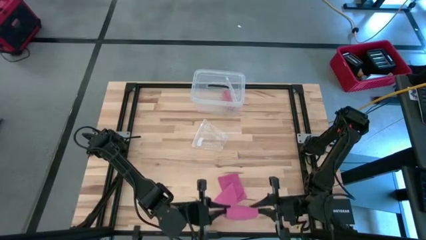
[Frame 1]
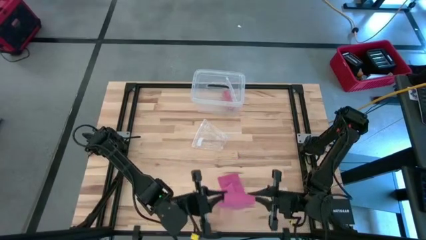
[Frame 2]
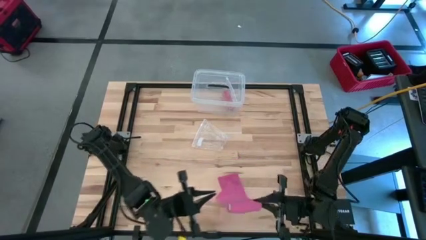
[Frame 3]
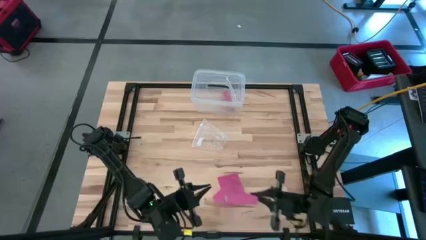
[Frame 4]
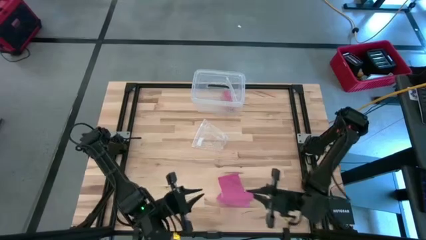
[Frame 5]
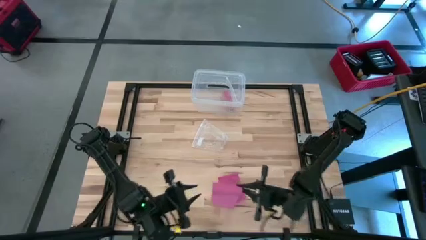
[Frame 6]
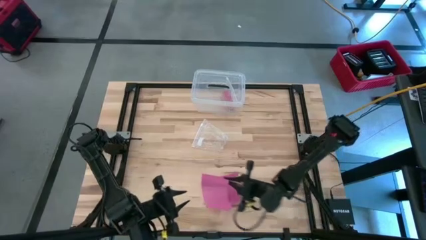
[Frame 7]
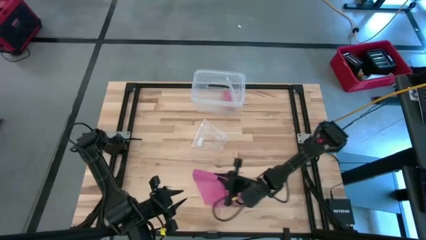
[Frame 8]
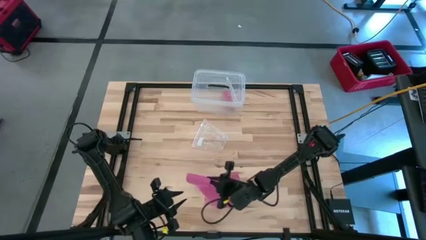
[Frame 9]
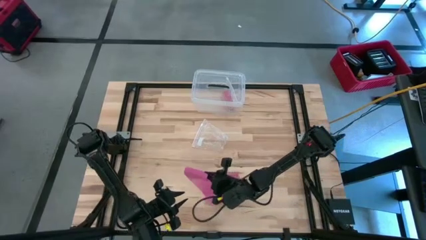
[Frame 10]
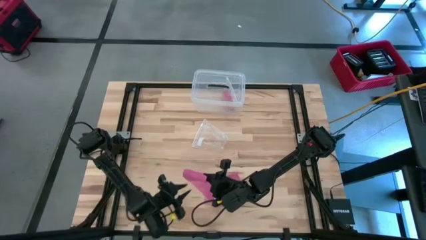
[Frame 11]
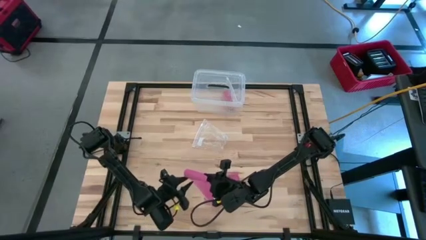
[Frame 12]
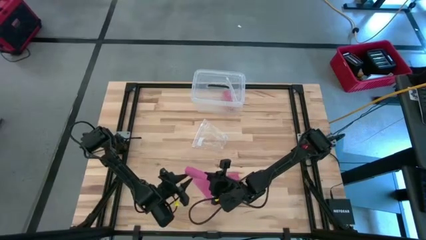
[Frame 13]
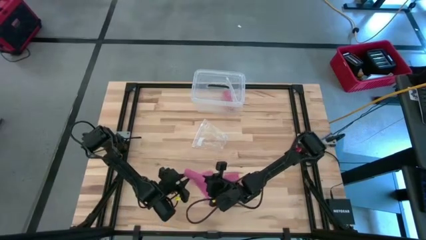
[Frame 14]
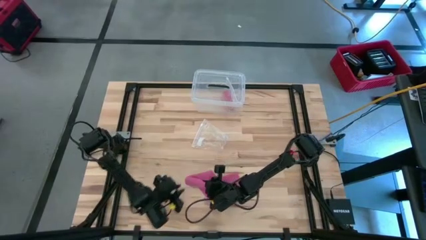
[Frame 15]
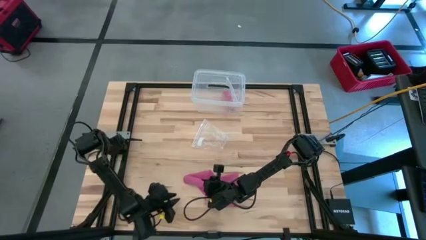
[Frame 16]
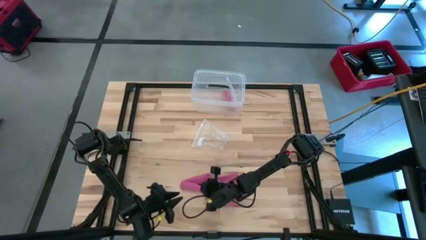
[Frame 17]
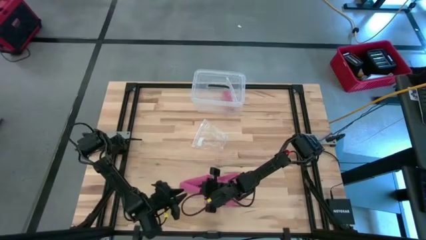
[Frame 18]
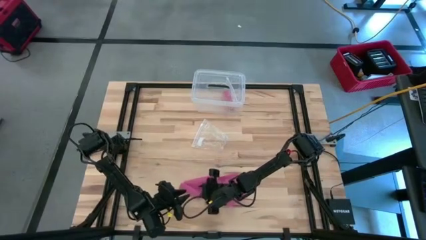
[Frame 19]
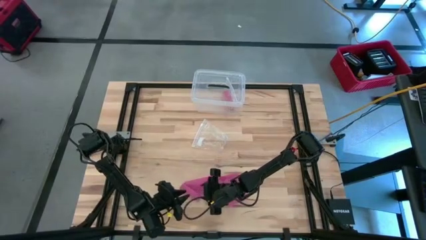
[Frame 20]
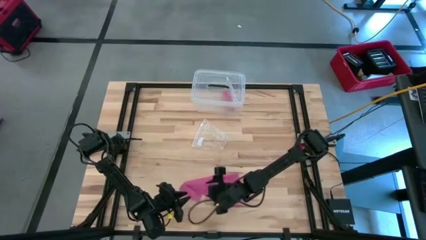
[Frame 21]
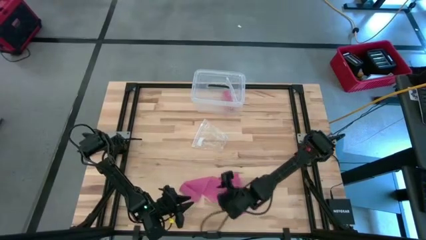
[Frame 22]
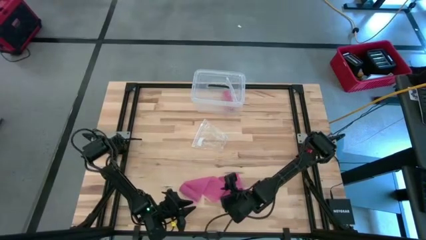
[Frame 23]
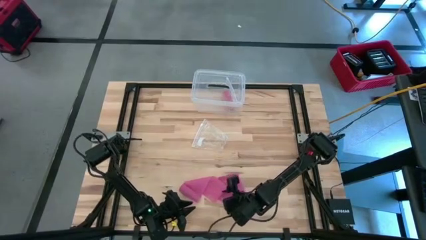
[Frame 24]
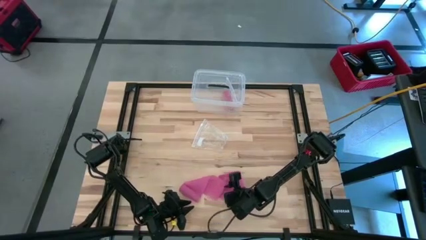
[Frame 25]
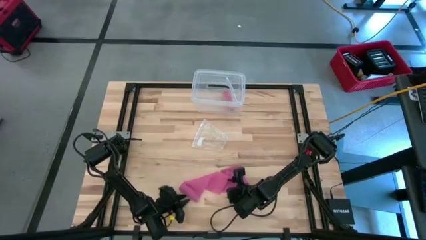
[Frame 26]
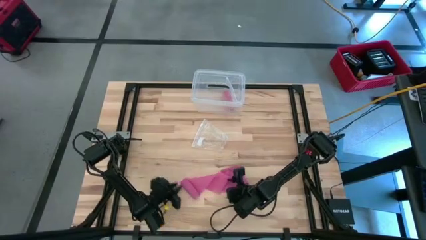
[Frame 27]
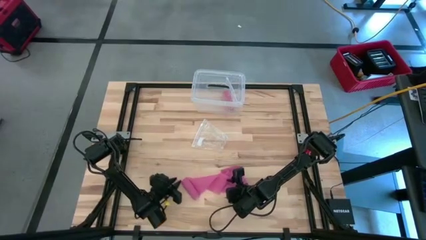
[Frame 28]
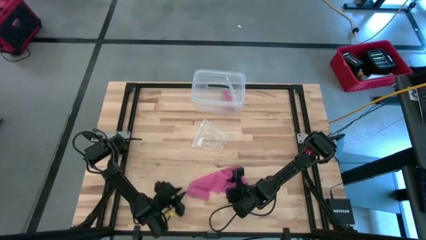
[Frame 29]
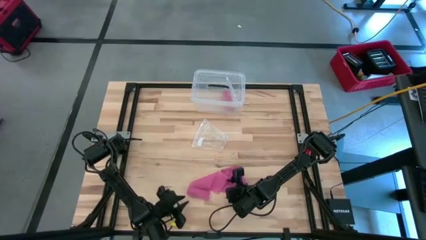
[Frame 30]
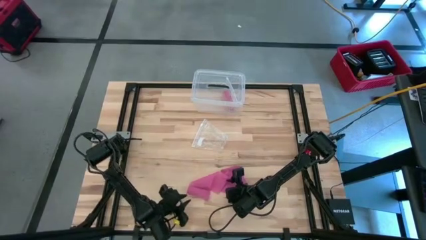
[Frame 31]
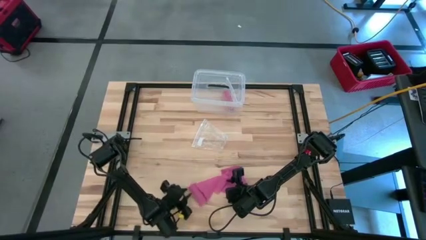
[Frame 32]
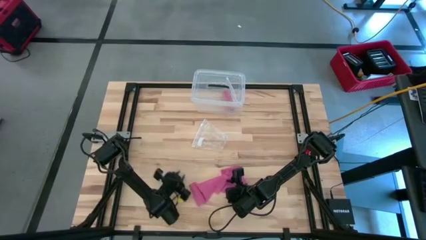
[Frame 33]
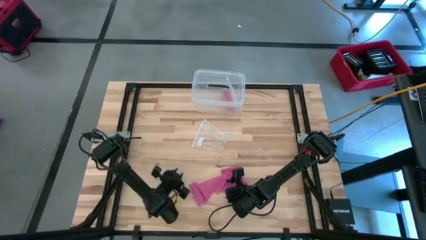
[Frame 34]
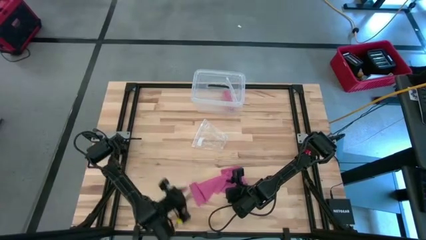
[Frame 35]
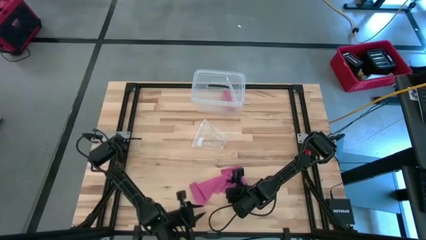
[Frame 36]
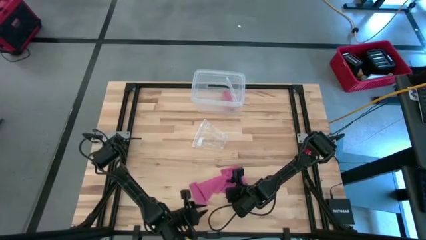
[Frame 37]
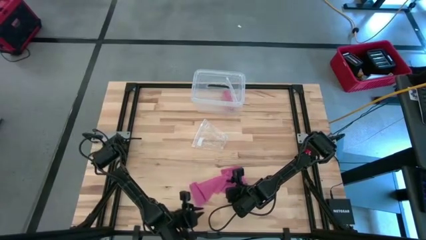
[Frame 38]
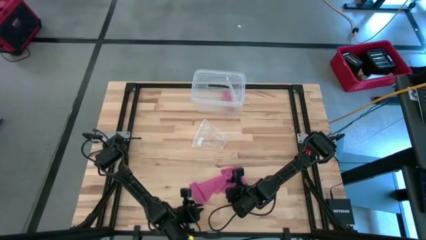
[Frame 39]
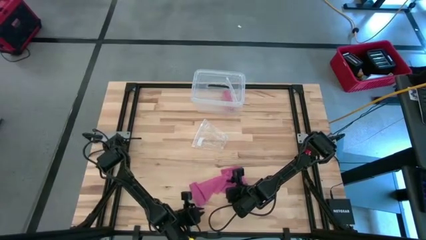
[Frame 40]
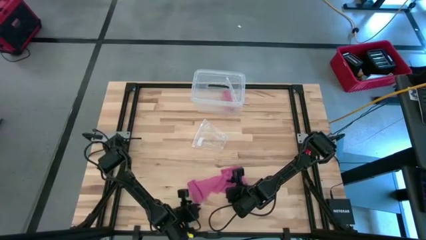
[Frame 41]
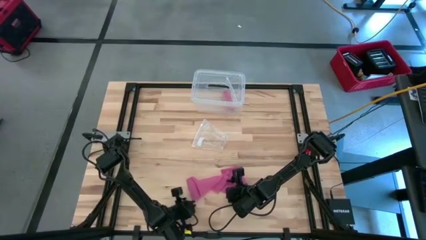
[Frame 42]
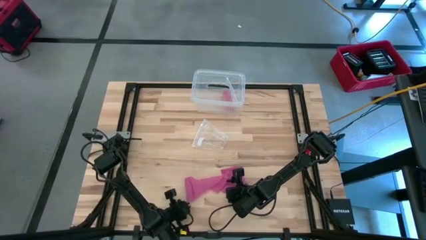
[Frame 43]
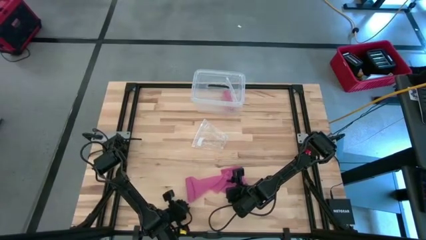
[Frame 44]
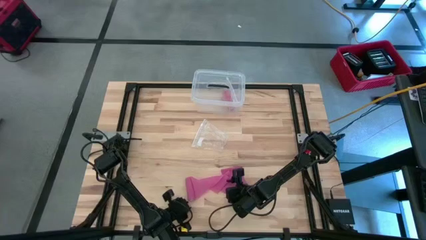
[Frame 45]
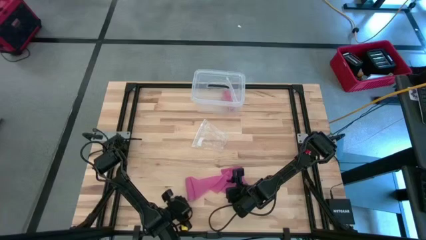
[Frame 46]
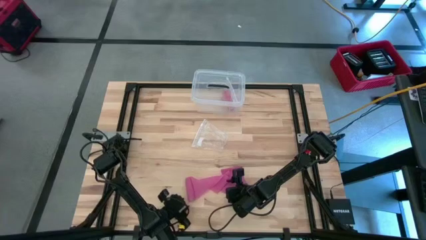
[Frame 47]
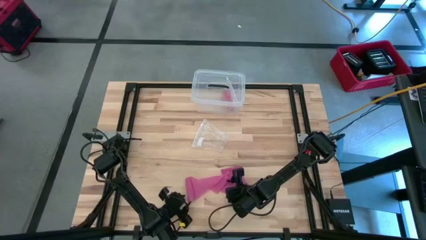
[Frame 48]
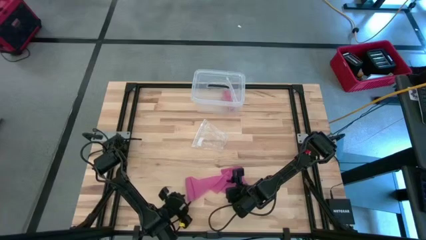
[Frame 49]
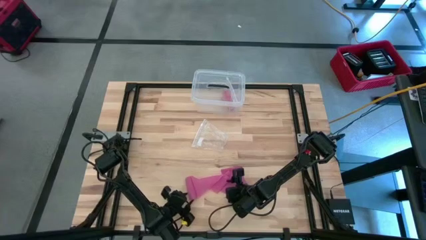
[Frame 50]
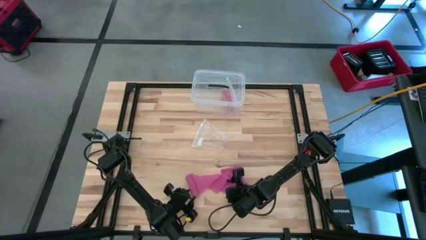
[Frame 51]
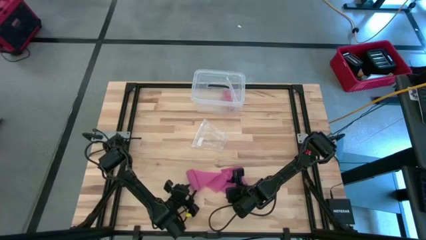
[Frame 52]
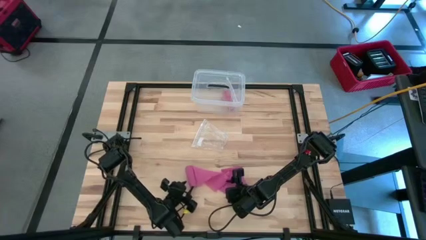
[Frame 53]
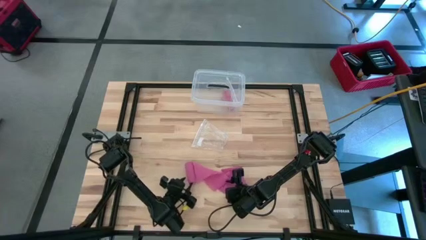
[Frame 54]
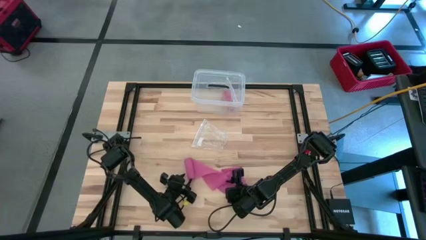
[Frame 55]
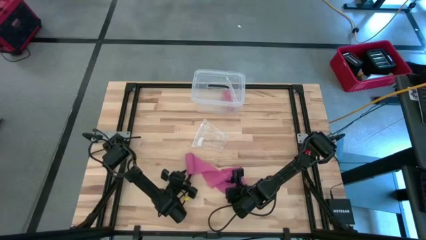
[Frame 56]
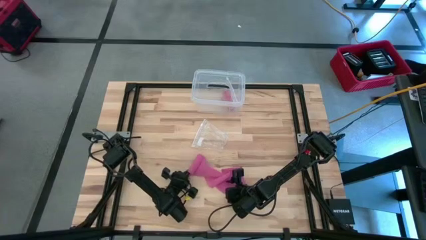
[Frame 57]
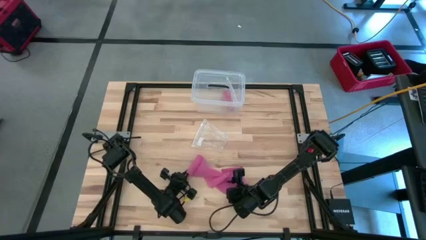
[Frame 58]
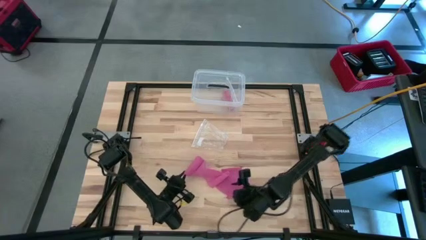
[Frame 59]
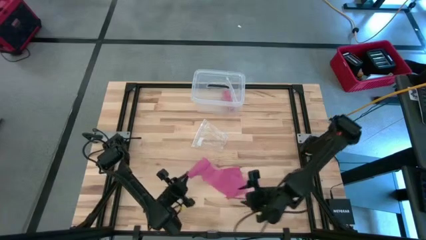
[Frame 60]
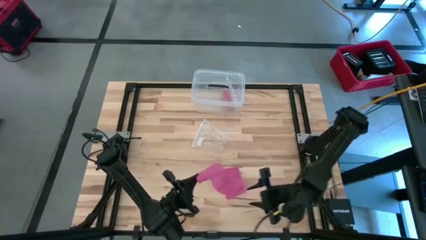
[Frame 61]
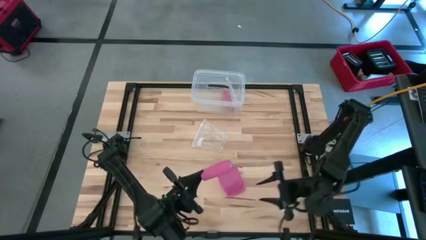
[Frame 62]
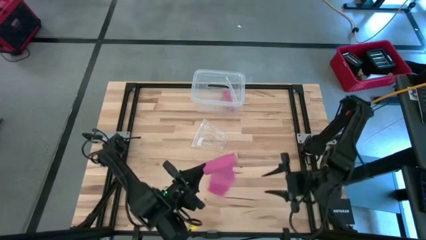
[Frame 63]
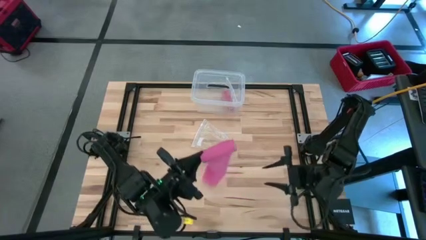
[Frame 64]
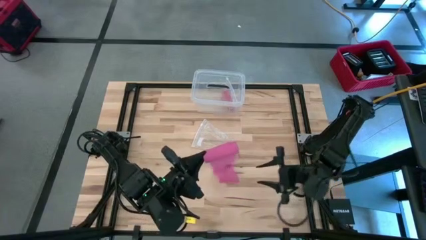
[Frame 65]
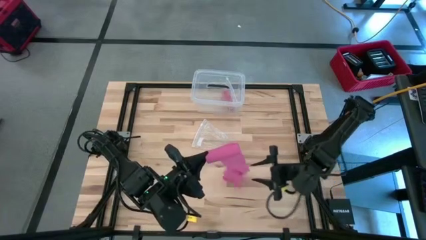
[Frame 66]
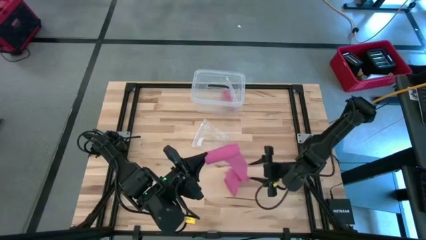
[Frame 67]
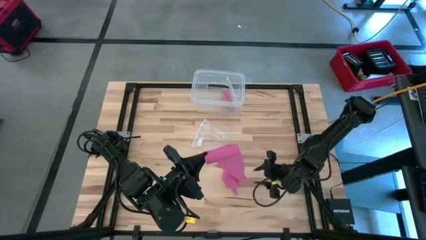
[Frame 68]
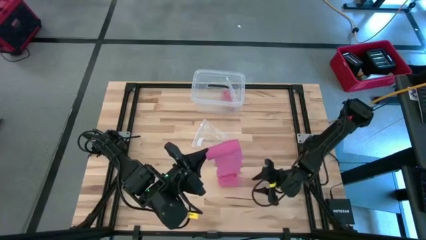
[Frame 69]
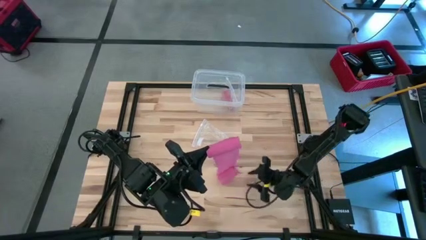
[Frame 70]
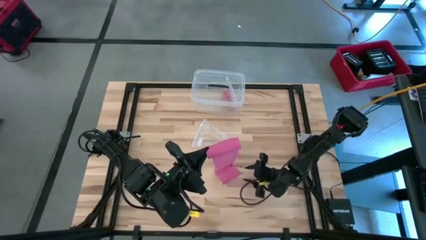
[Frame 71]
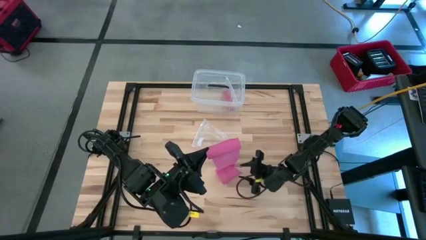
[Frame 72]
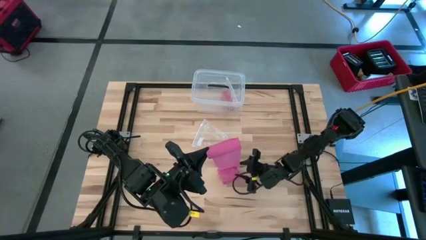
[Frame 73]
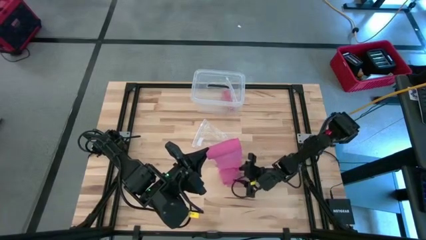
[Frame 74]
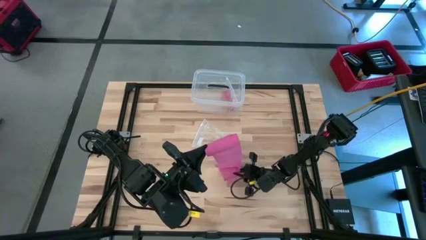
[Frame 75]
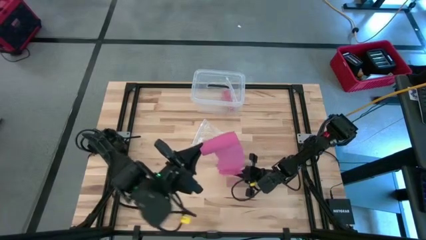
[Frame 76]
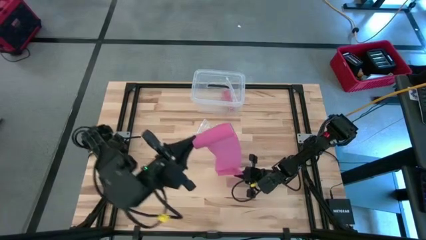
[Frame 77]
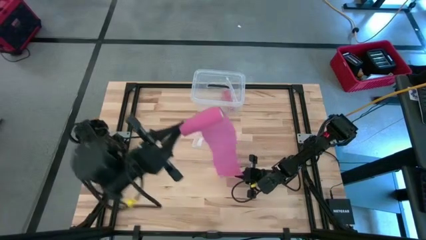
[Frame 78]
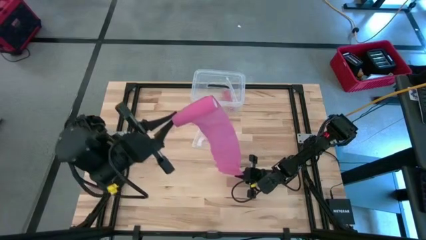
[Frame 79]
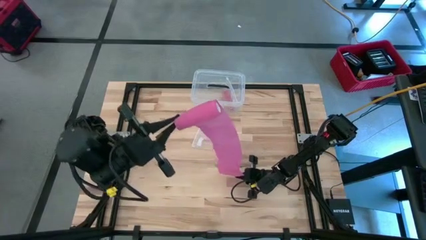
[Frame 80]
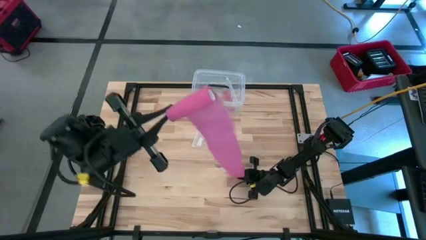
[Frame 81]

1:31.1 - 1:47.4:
Task: Roll bandage
Roll the pink bandage
